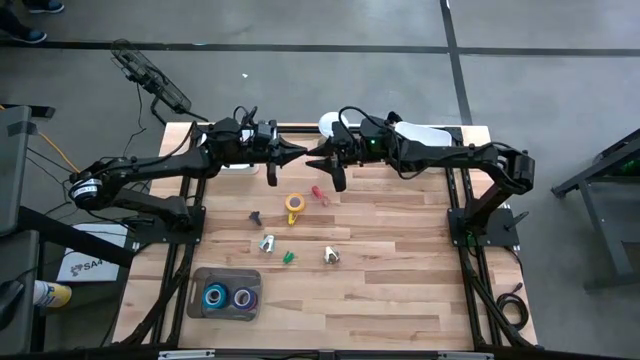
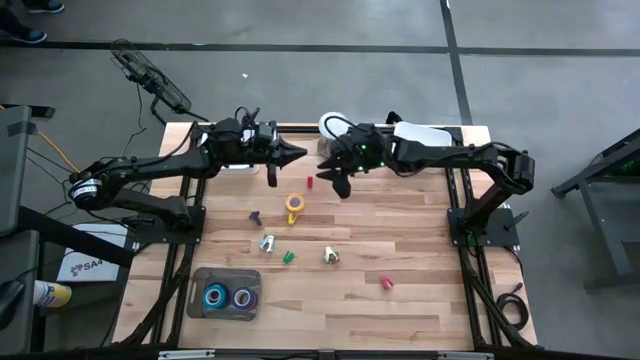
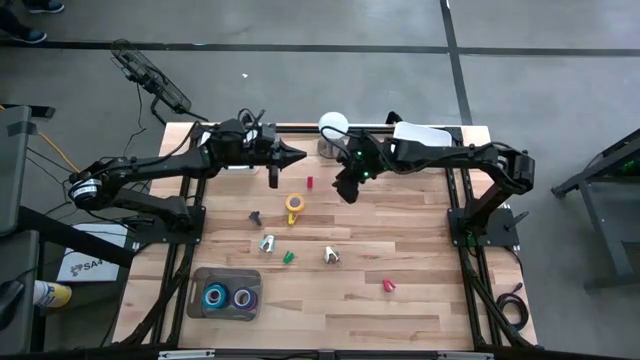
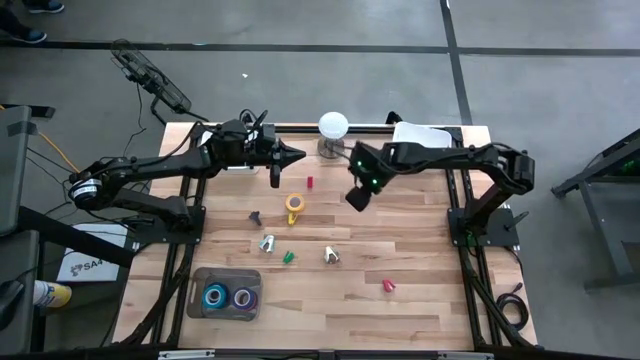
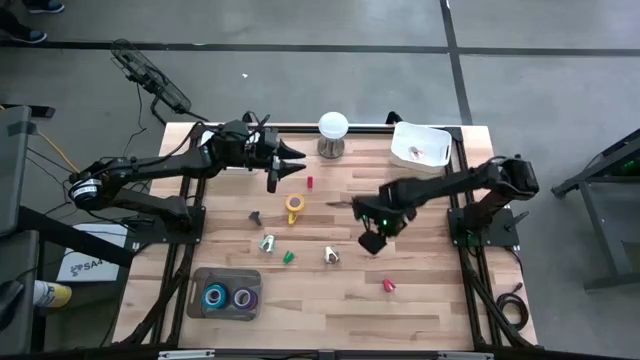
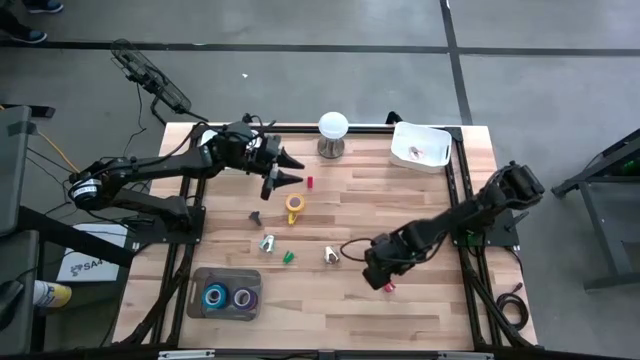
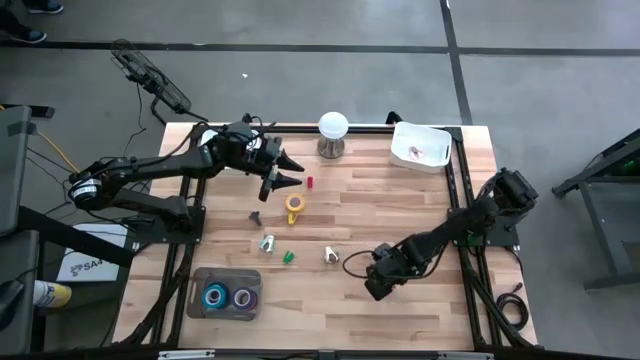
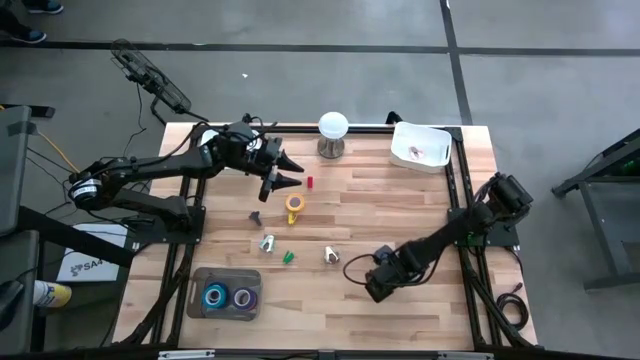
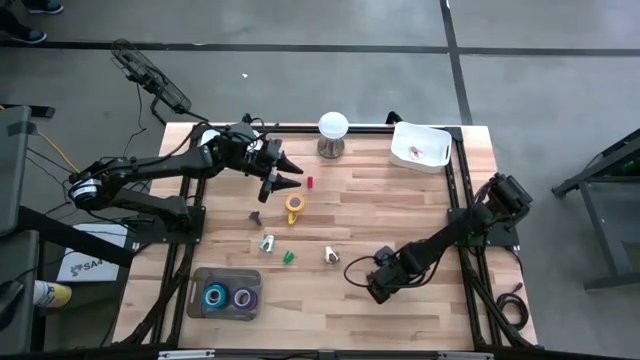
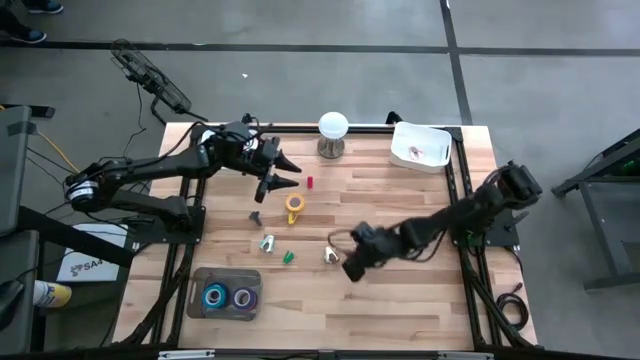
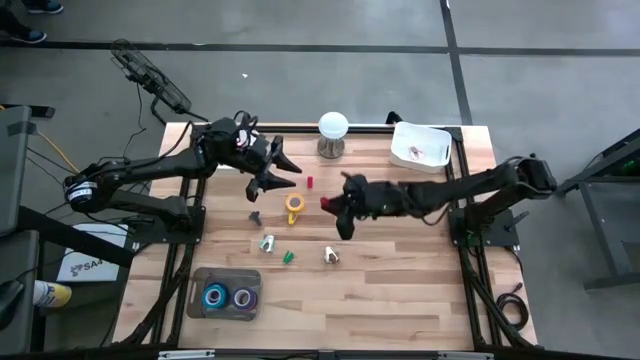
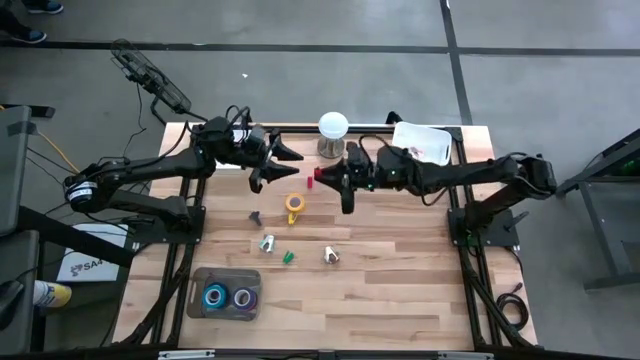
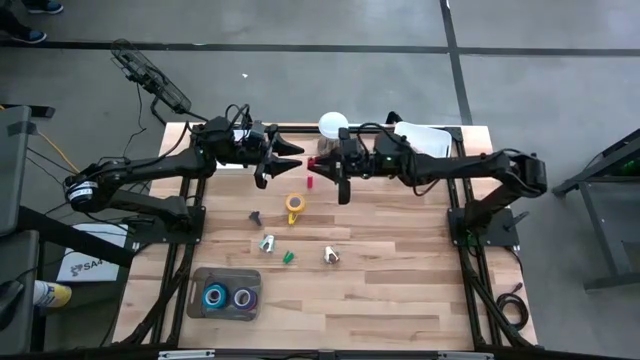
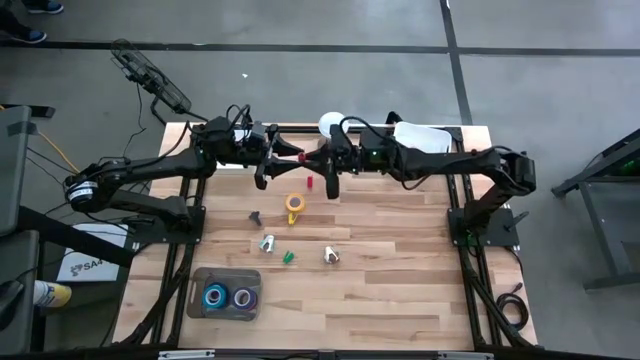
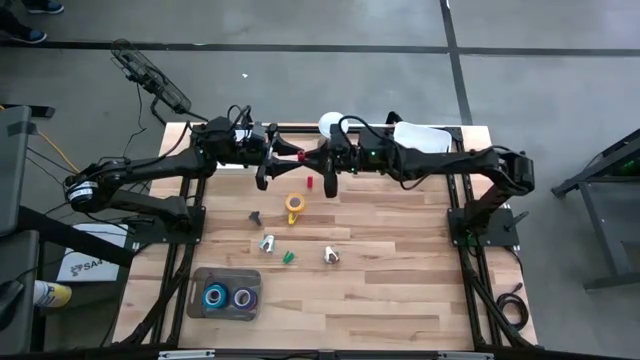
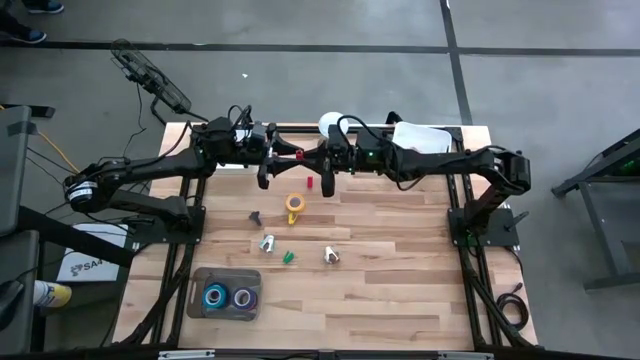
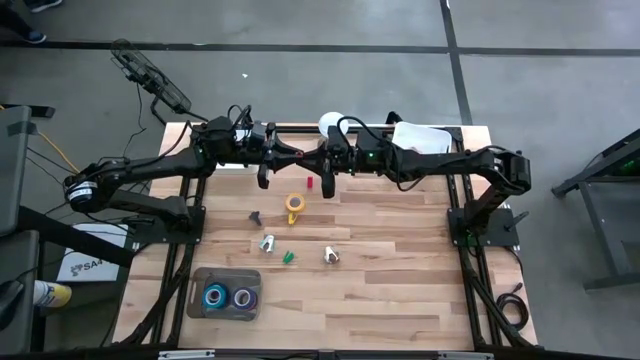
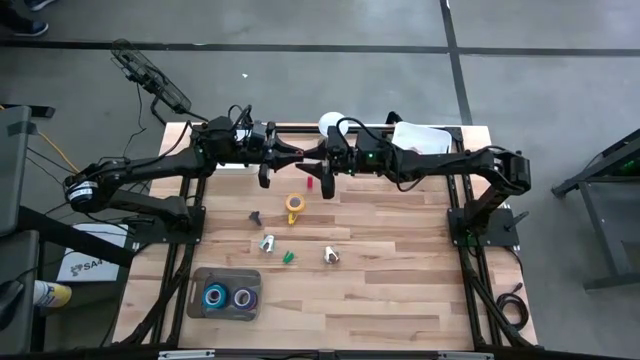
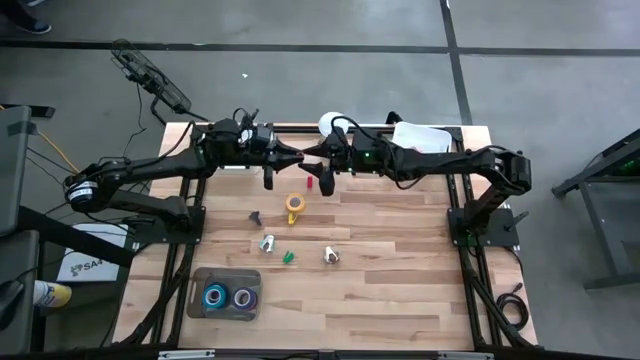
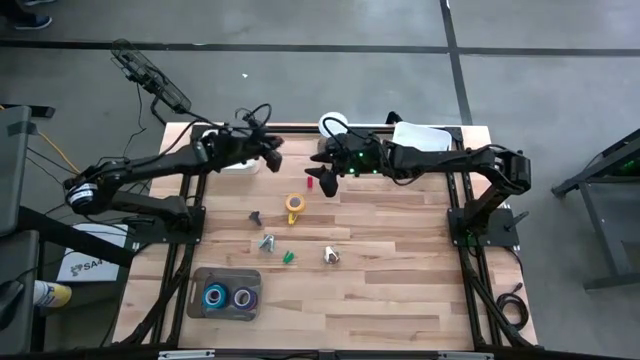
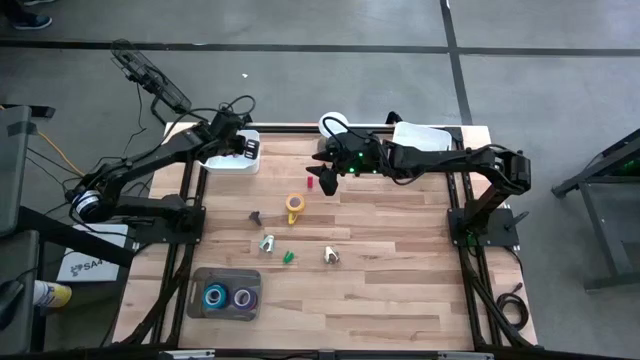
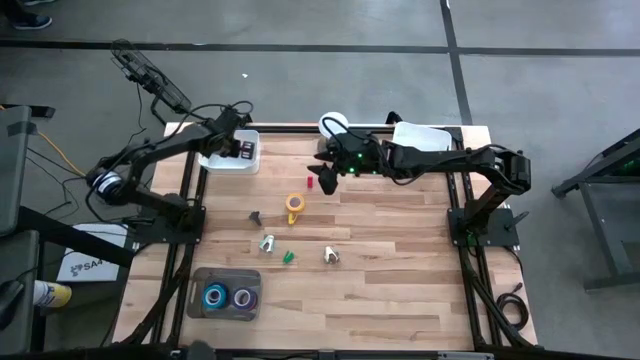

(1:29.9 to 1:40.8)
Task: Pick and place Stapler, Stapler remover, tape
Put the right red stapler into the left white bin

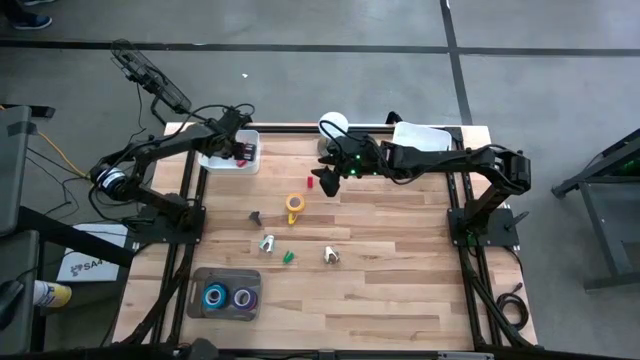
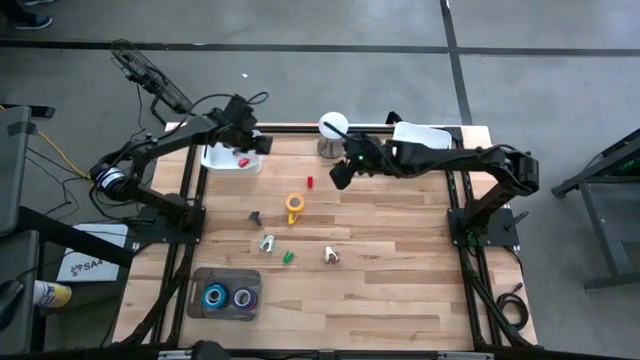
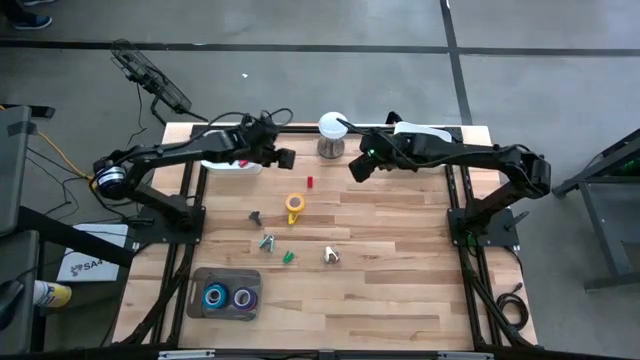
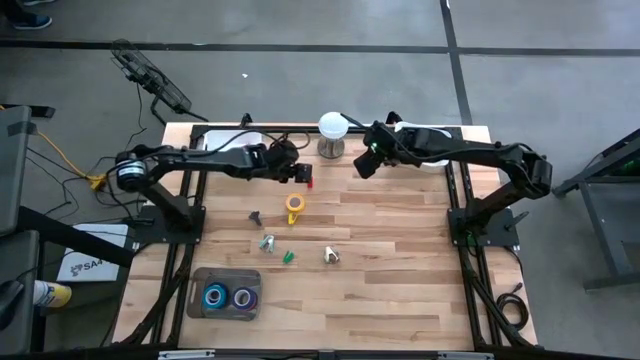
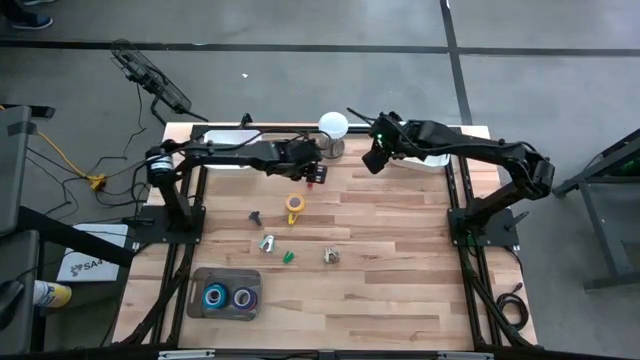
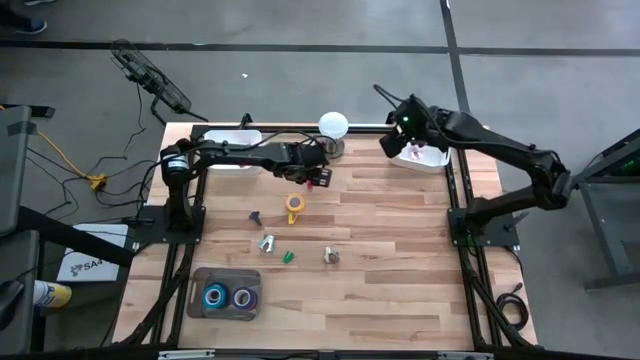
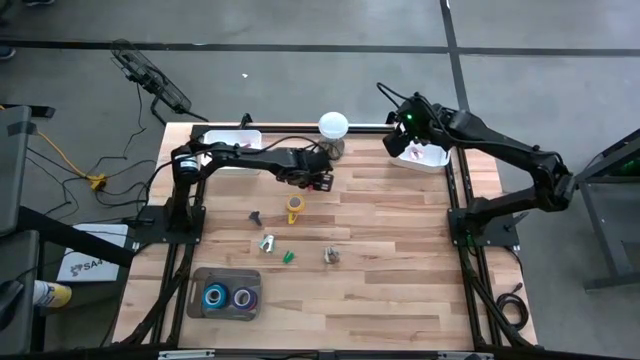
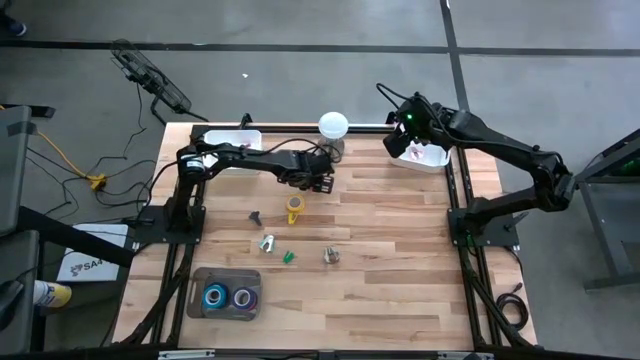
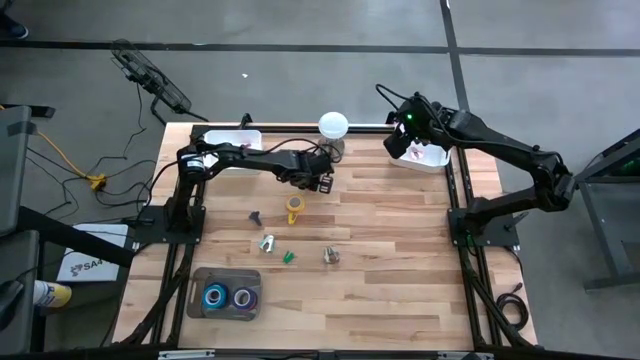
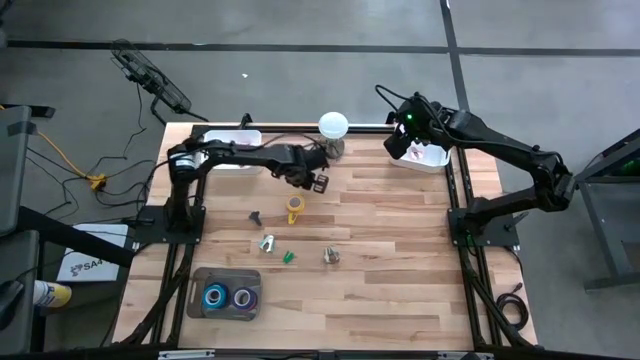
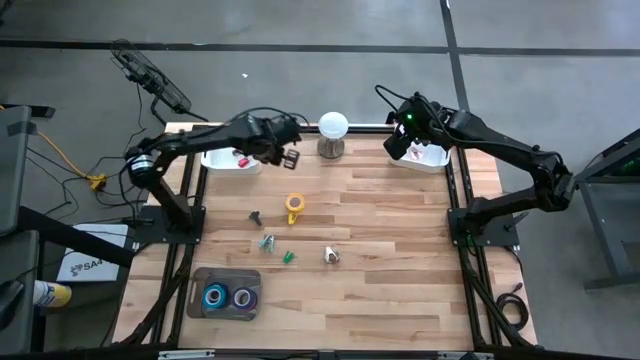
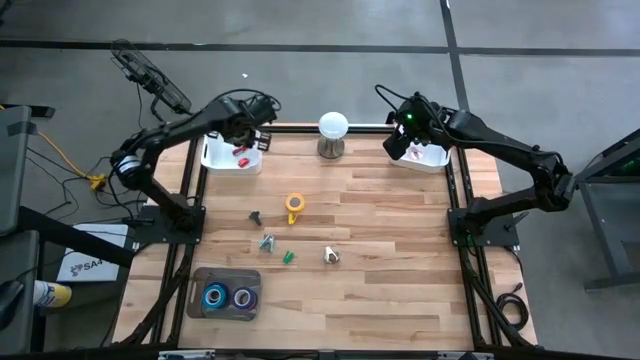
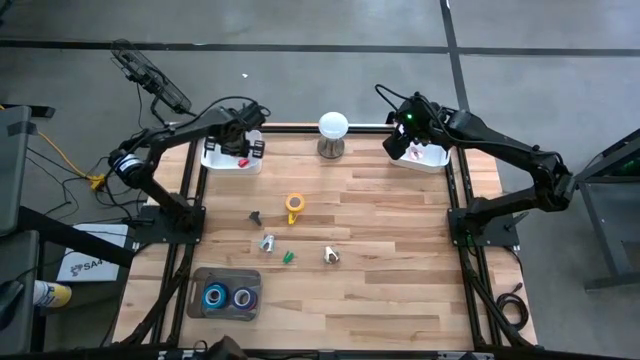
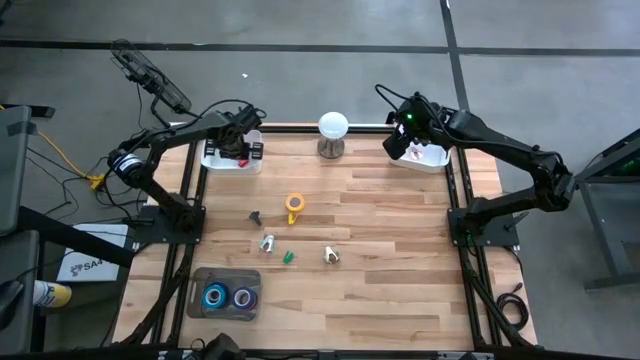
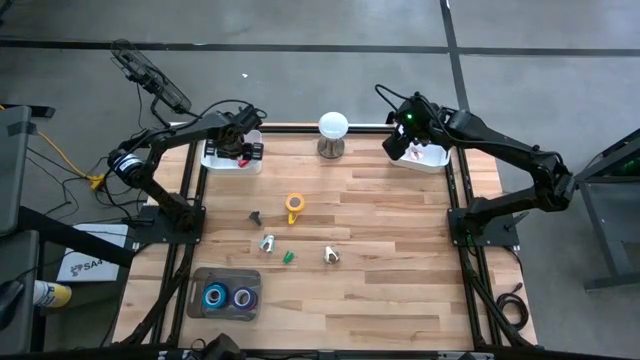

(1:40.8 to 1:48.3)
Put the red stapler into the left white bin

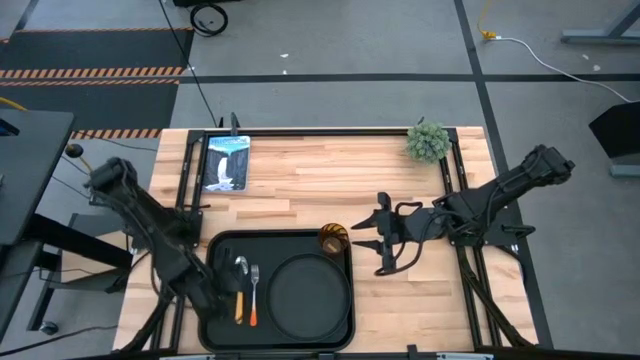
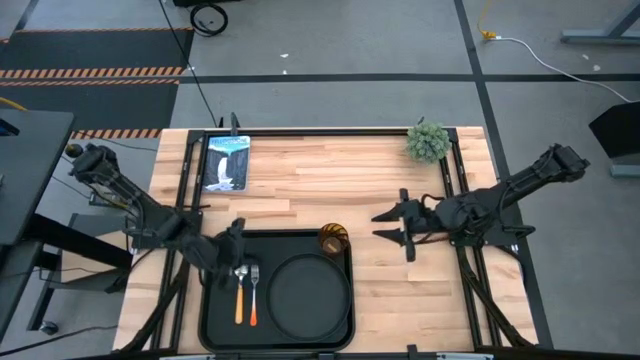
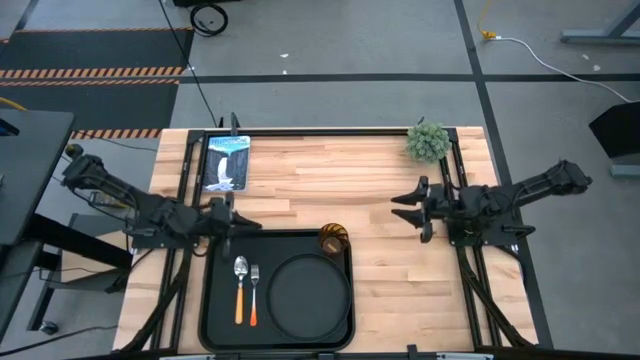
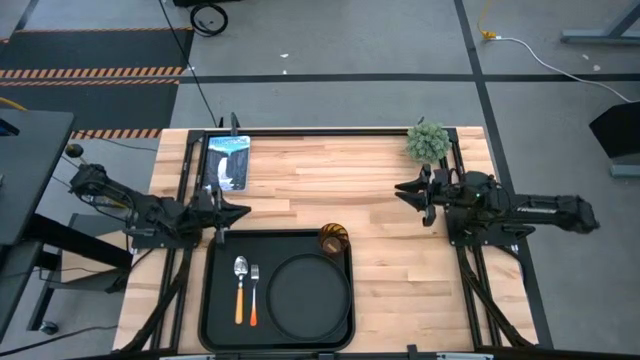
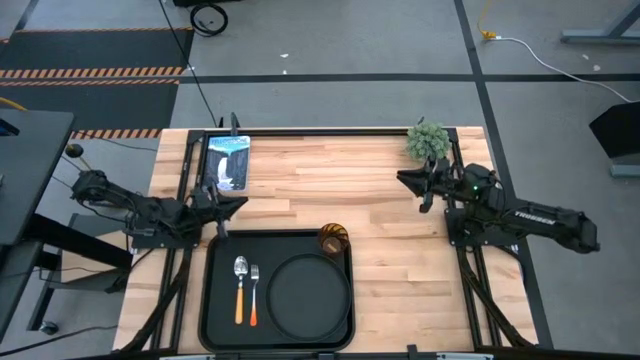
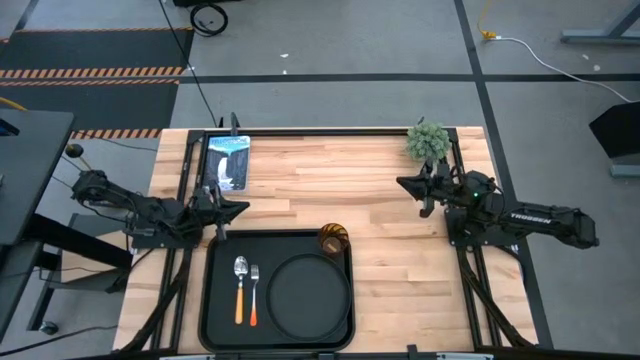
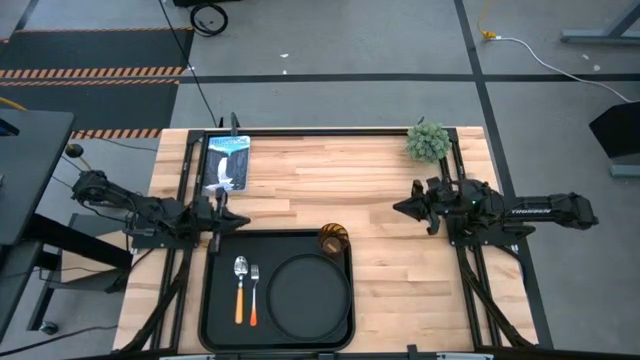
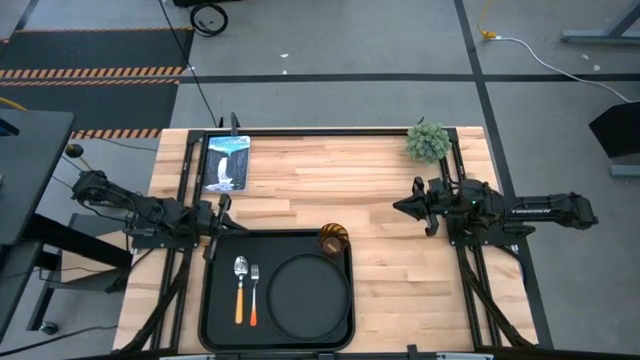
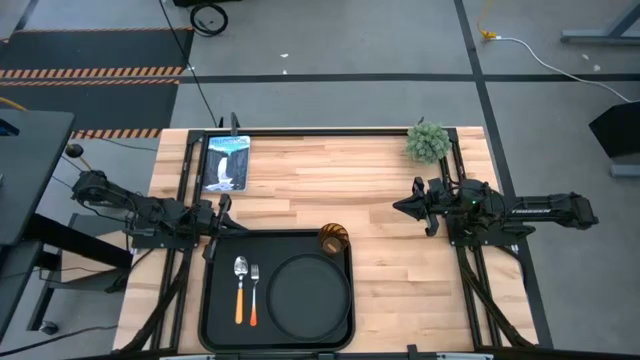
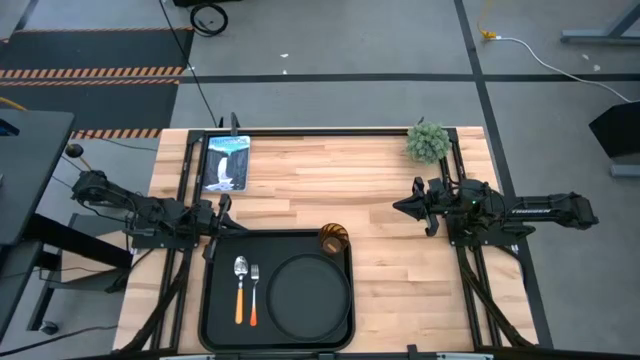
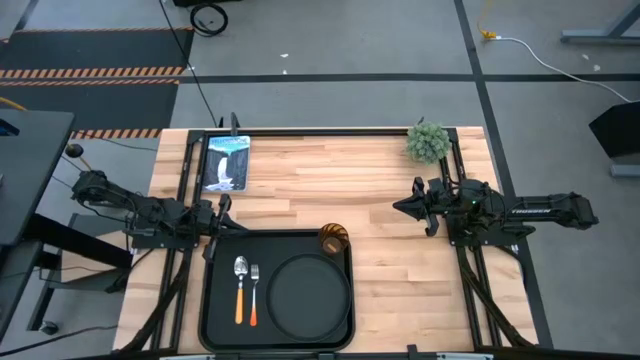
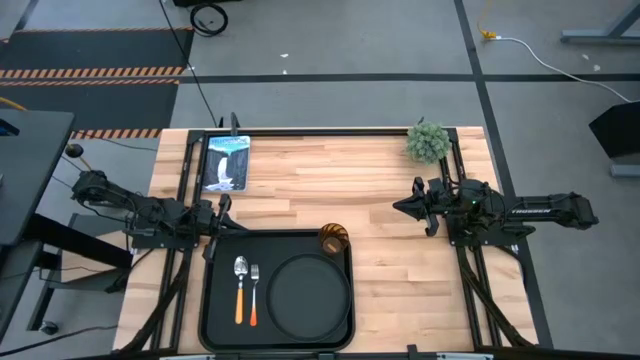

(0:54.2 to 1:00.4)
Task: Pick and place plate/cup/fork/spoon on tray
Return to Home Position
